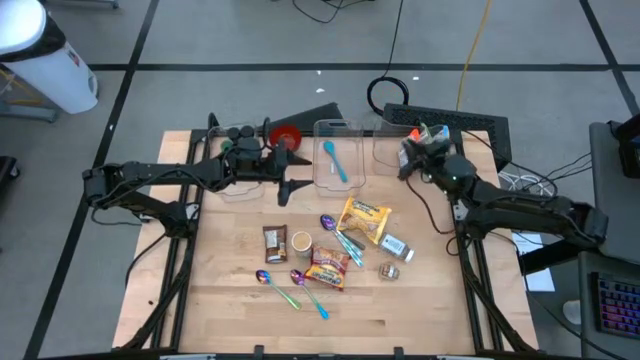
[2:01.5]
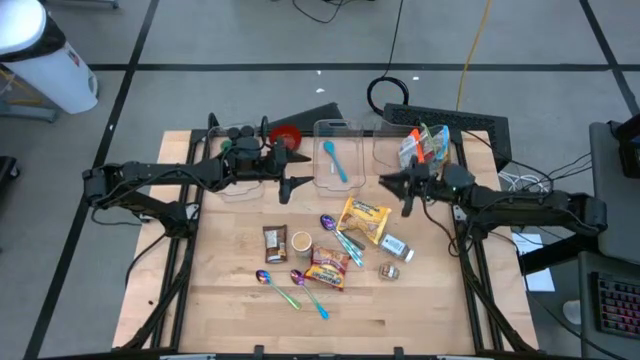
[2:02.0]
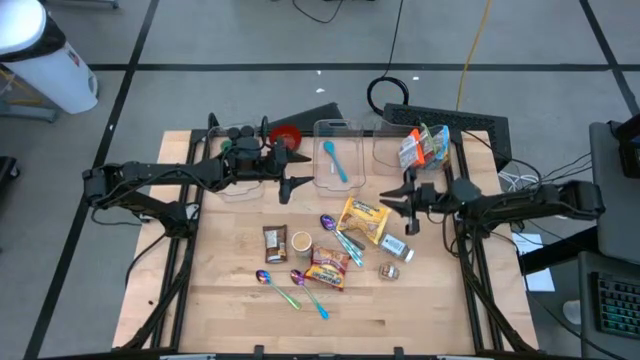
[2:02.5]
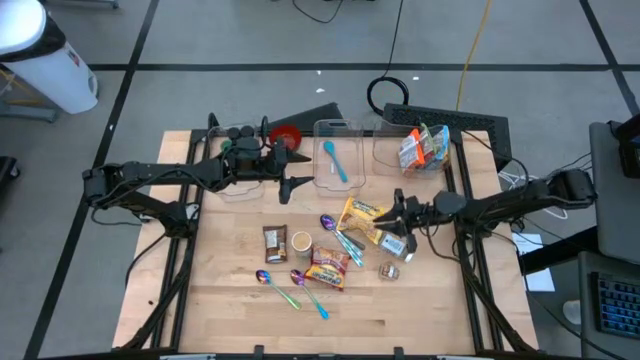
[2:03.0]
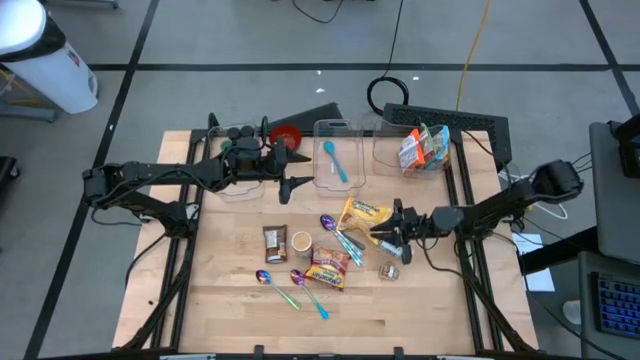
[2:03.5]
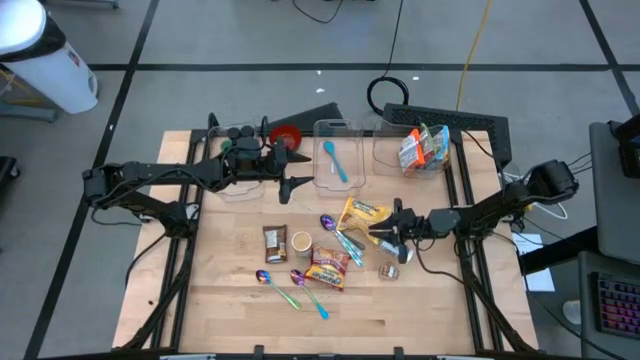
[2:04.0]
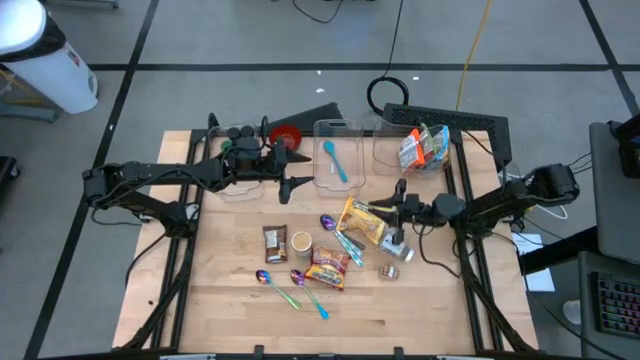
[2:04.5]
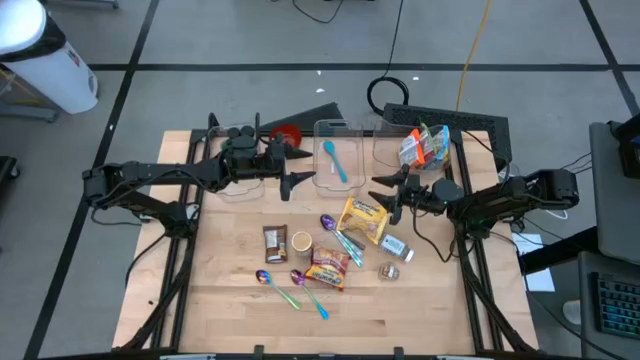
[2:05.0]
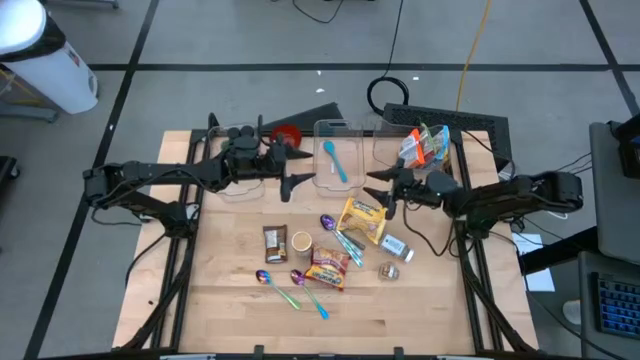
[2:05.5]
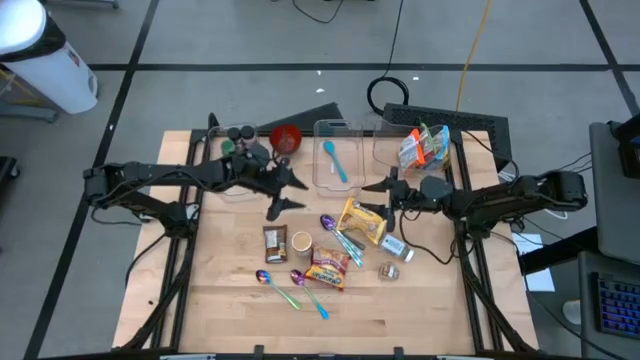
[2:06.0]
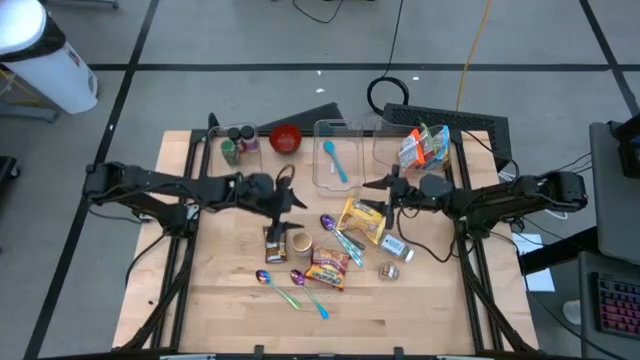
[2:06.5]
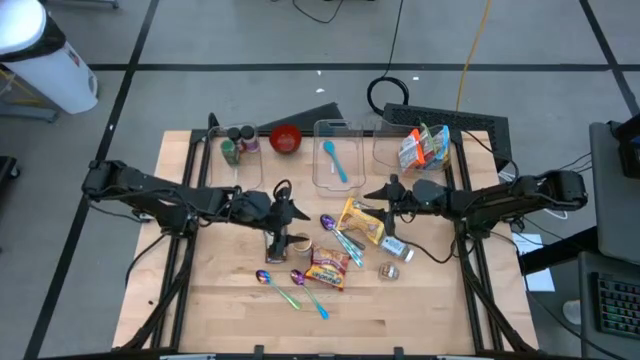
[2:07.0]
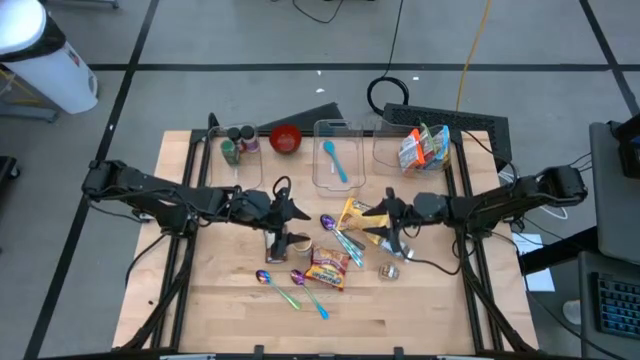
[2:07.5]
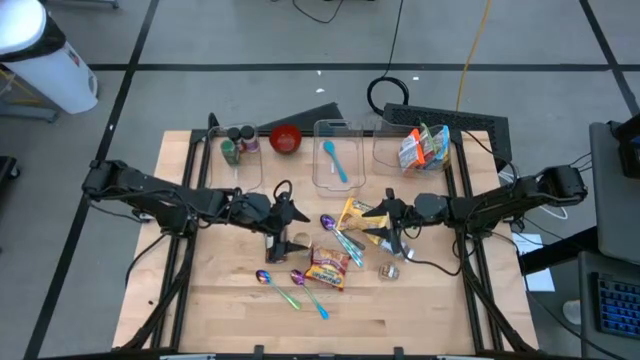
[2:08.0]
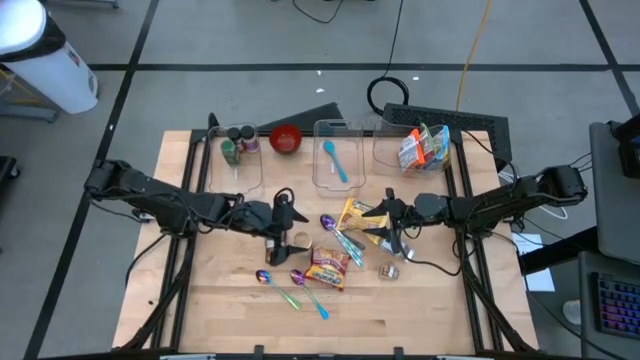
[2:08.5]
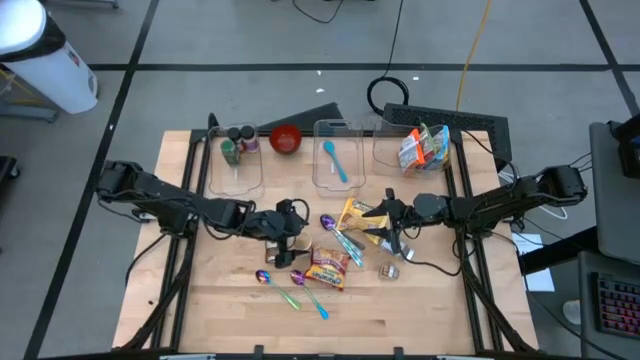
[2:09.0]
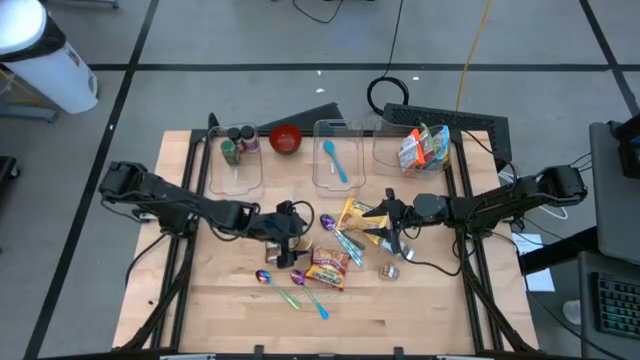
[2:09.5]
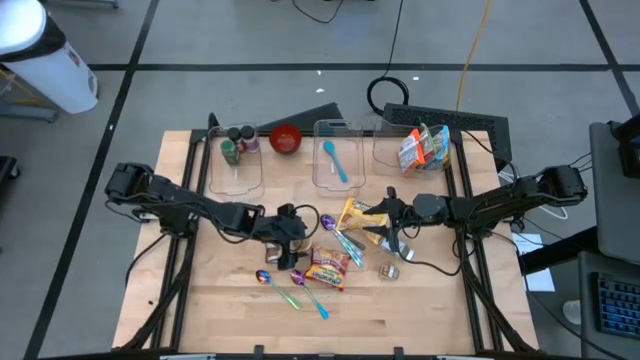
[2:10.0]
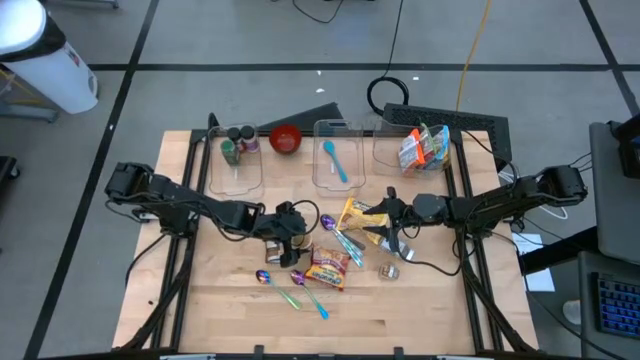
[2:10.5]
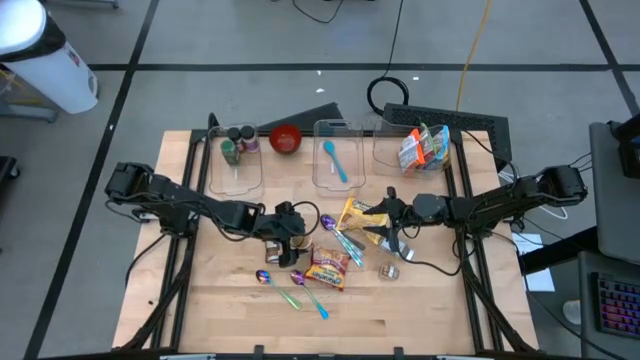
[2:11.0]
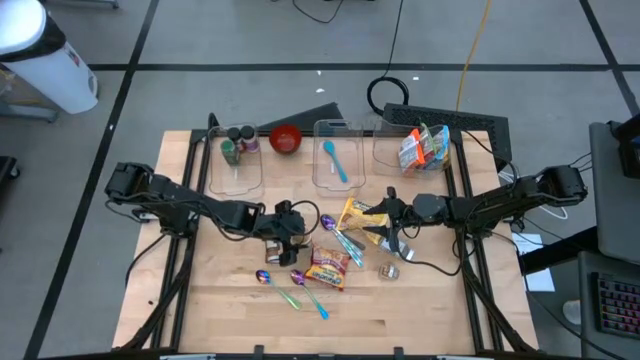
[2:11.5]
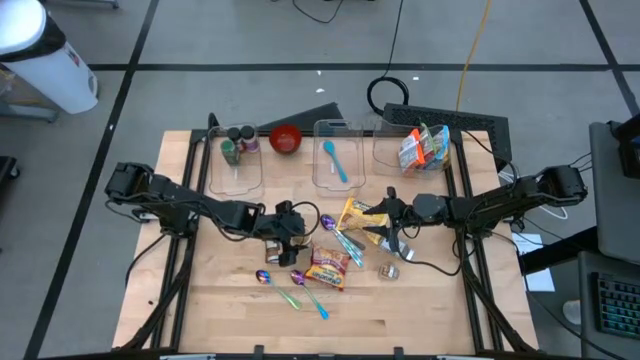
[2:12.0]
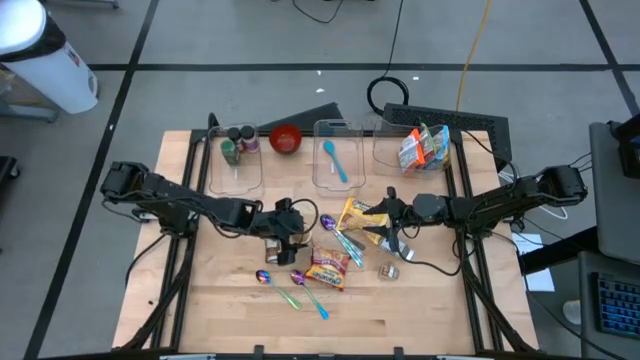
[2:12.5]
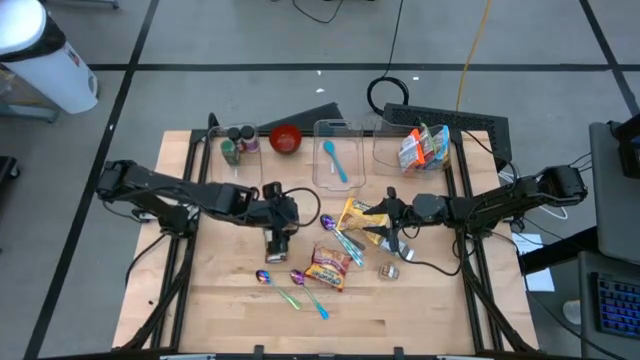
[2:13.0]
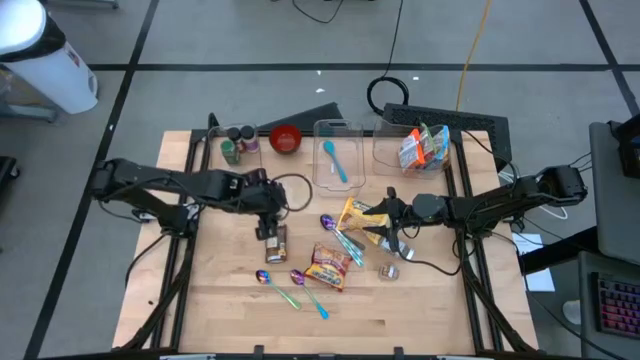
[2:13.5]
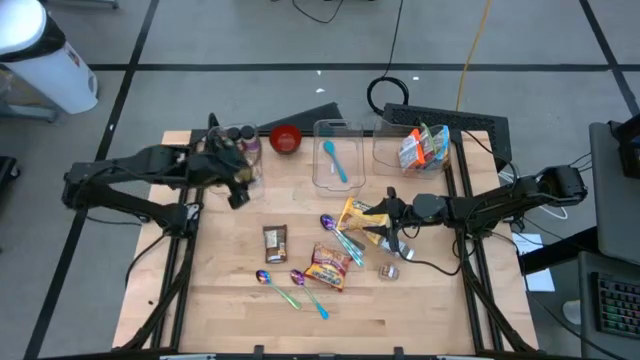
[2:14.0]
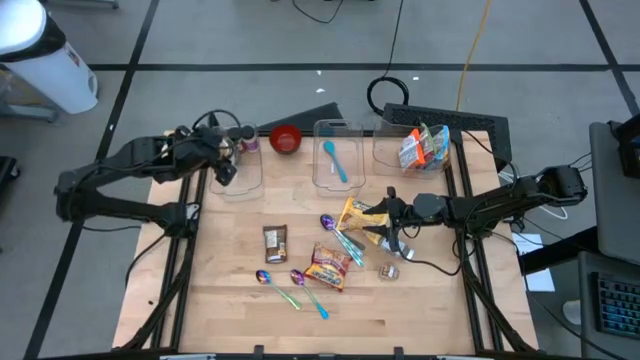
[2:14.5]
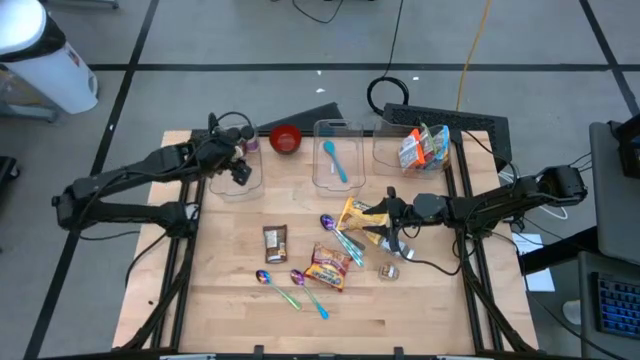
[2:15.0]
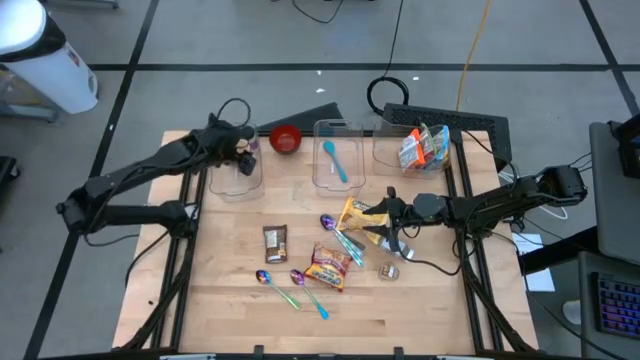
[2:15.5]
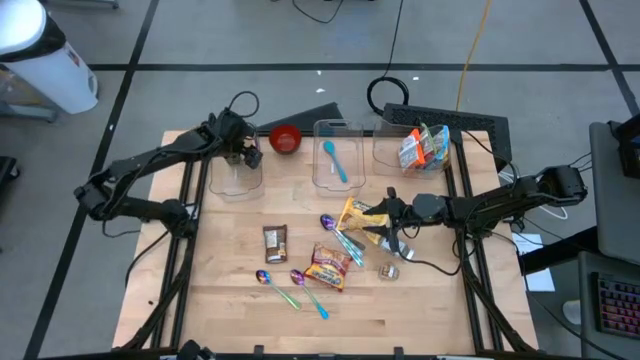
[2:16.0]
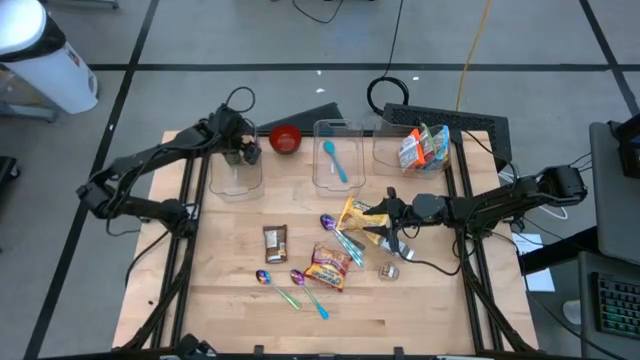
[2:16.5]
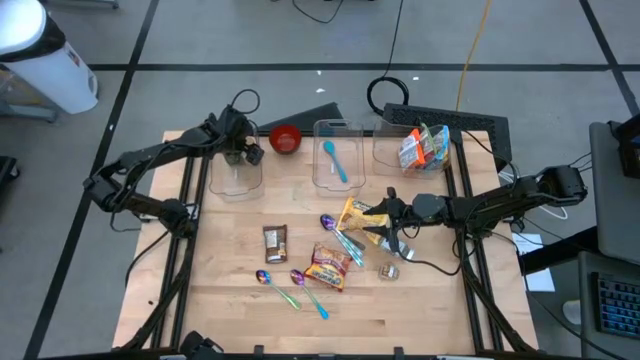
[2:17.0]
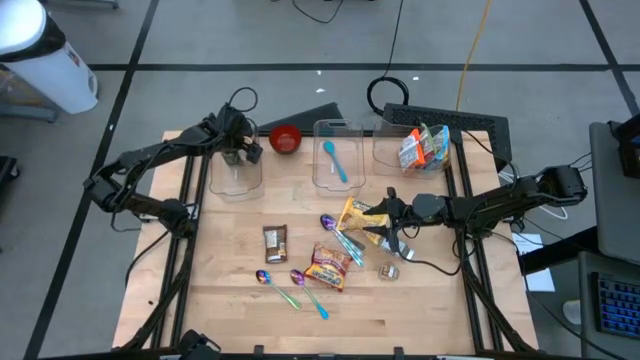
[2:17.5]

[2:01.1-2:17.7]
Task: Pick & Place Food Item
Put the gold seasoning bottle into the left transparent bin

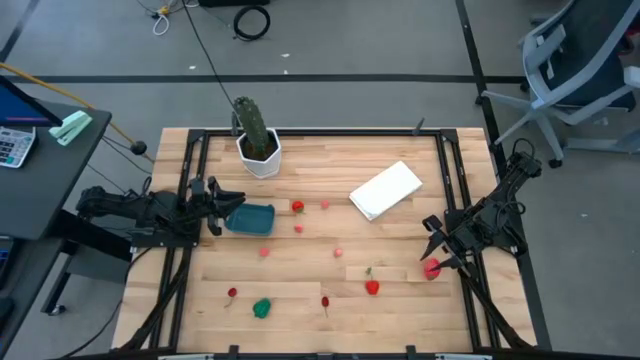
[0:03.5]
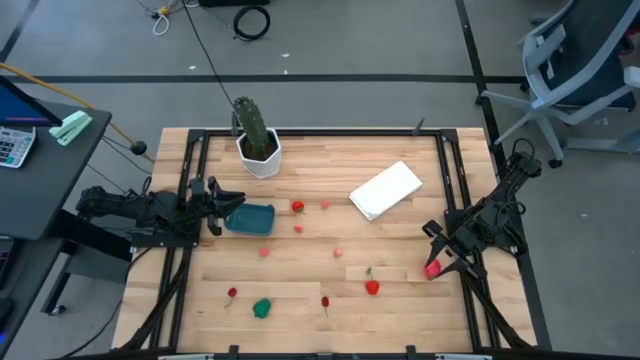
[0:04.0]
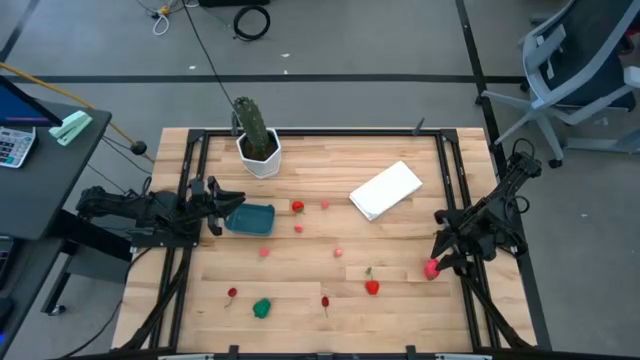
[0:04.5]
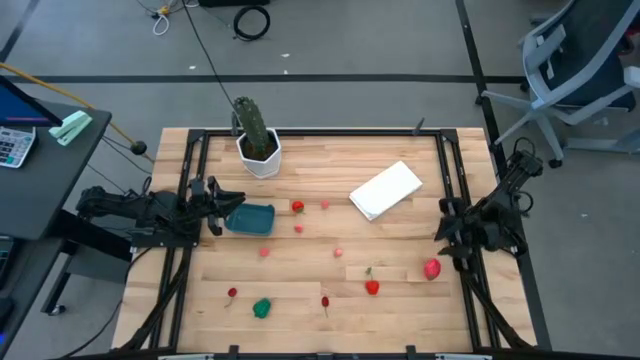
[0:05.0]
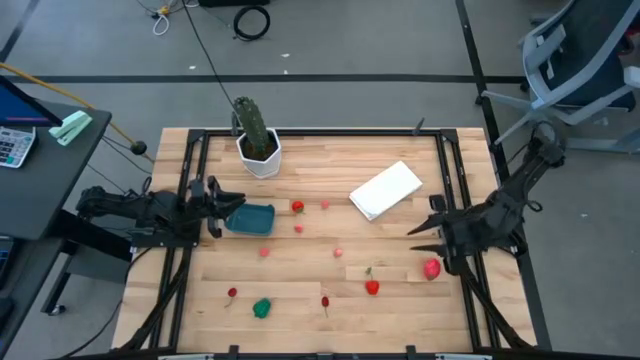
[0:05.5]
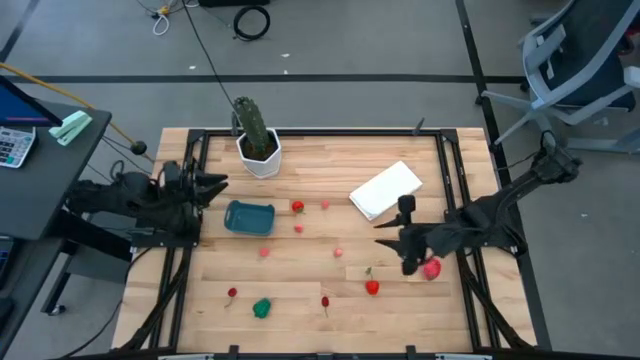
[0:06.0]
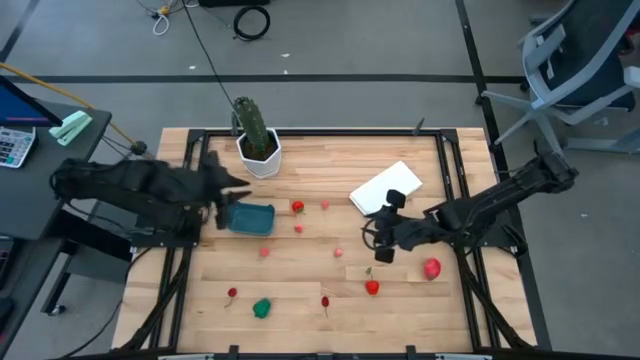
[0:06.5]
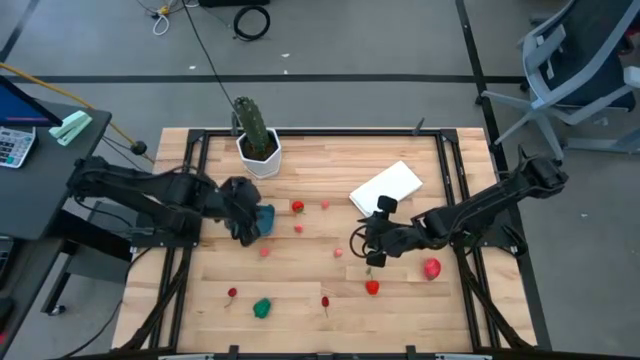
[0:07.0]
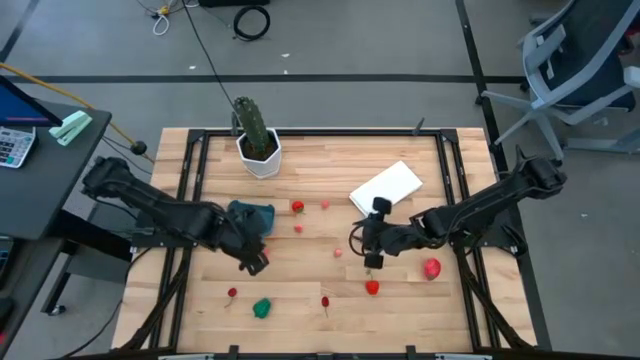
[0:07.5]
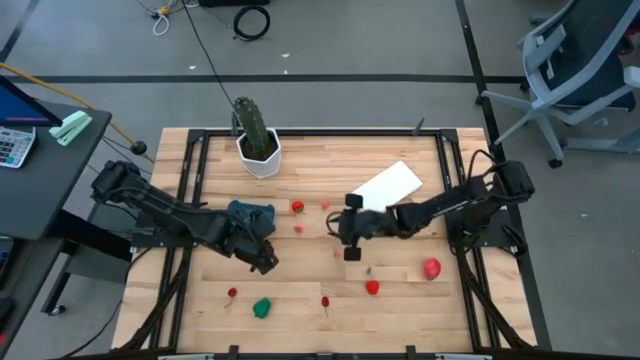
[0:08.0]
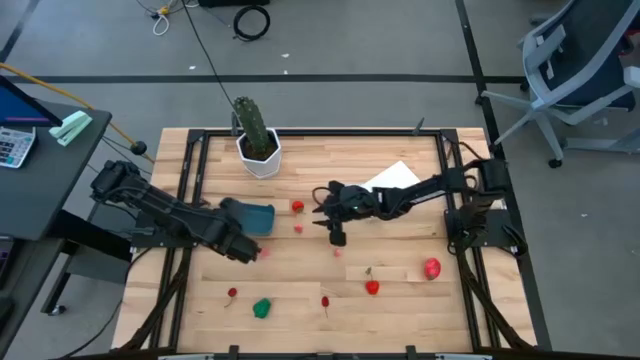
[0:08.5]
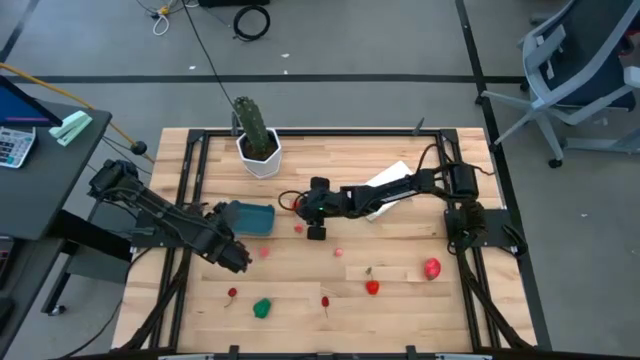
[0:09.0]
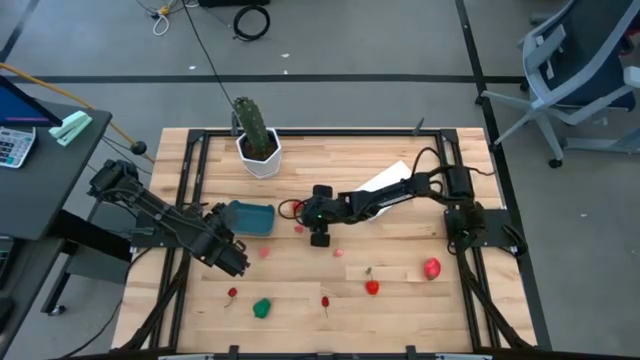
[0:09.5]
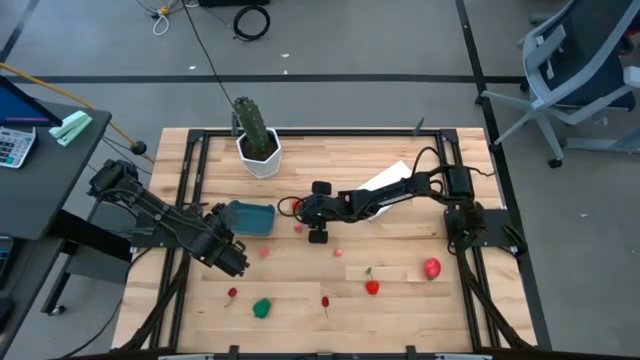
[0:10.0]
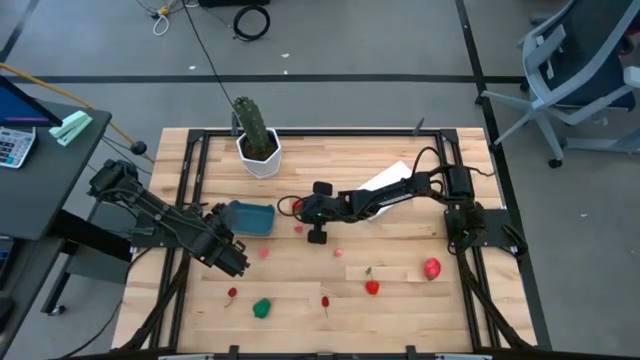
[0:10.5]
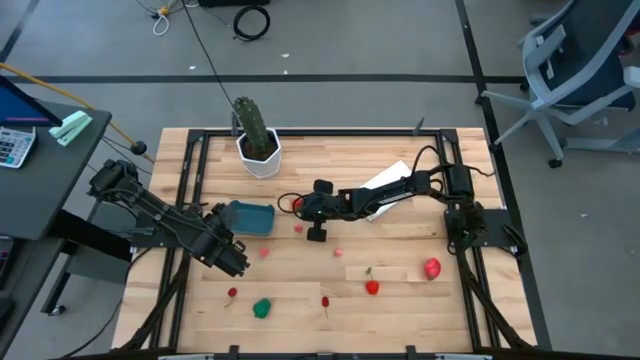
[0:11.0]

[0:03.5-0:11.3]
Task: Pick and placing Produce into tupperware
Put the top red strawberry into the blue bin
